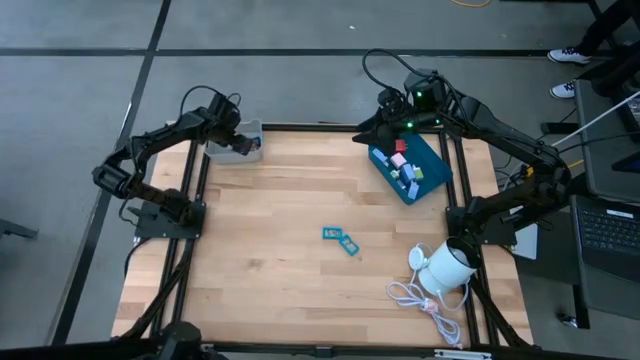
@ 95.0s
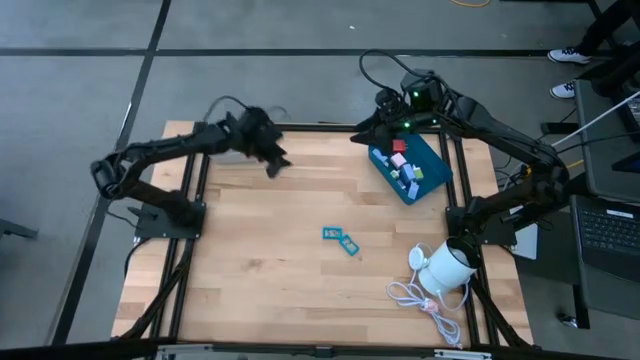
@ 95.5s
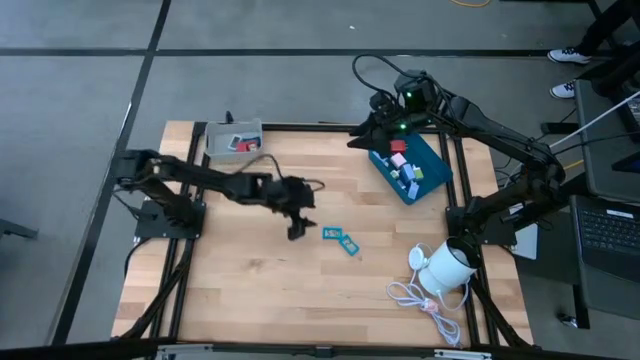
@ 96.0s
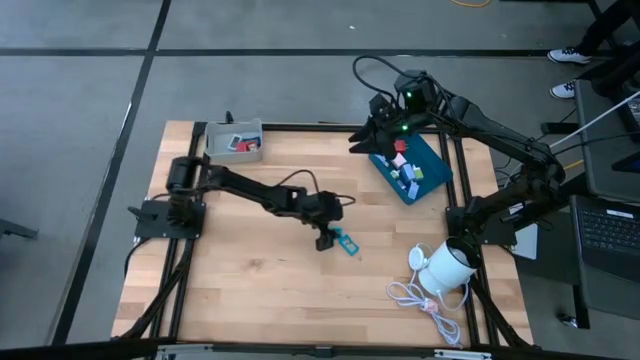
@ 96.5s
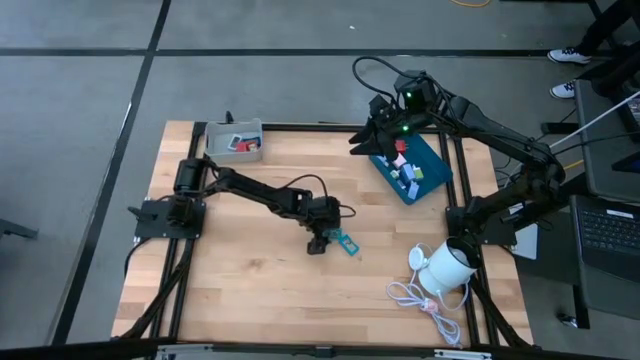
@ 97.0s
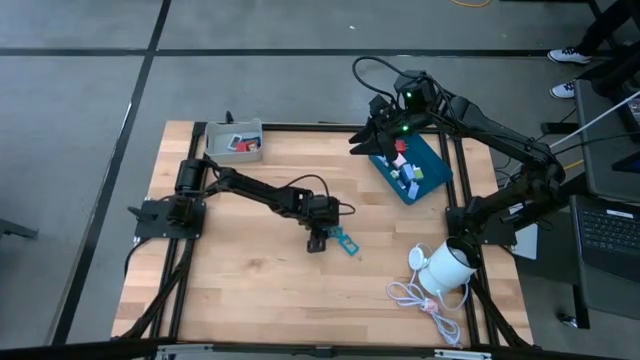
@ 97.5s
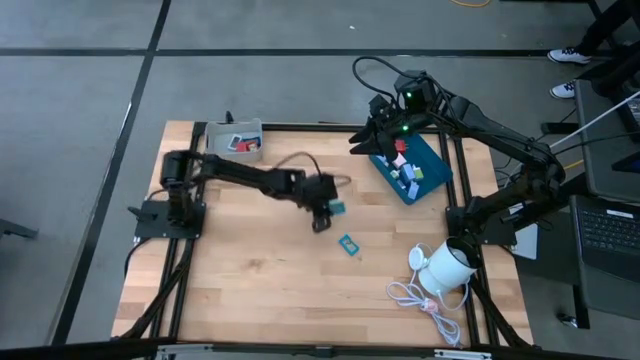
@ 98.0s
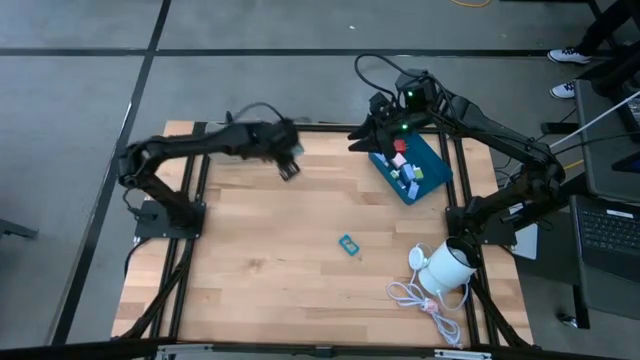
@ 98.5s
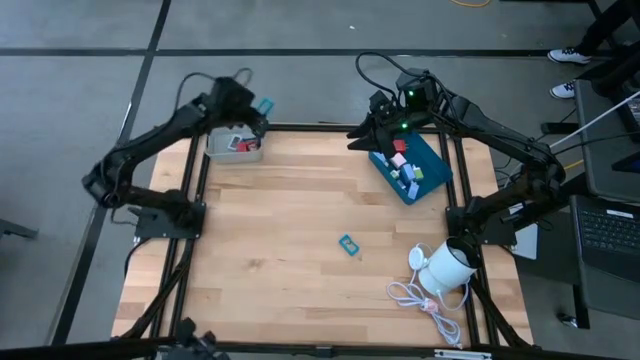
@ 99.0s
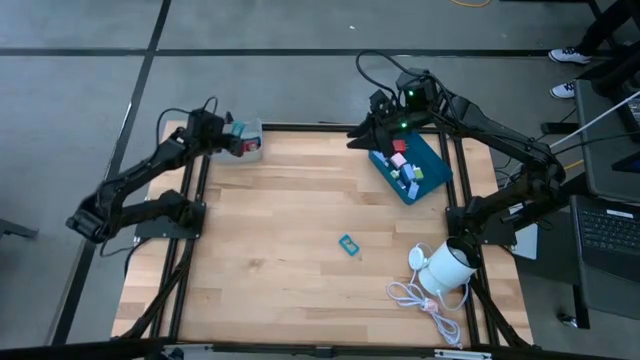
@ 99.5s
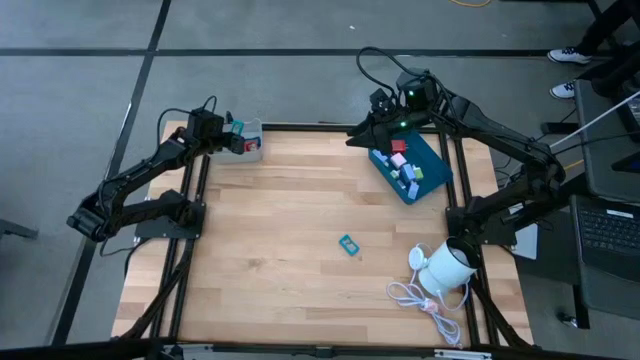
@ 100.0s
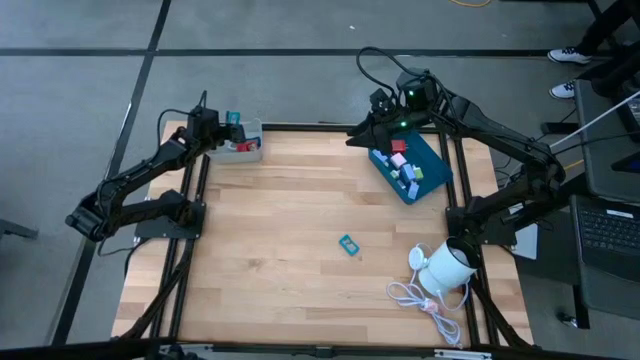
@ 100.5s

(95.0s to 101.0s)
Task: Pick & Place Office items
Put the top light blue digital timer into the gray bin

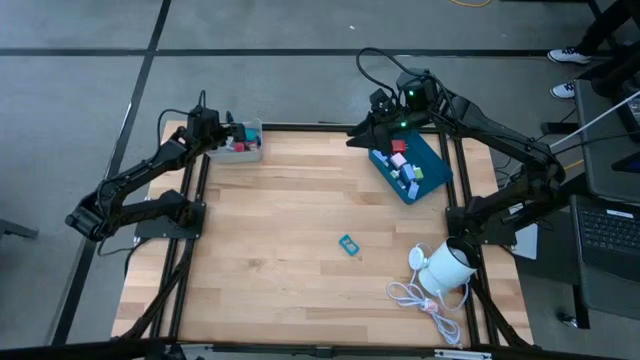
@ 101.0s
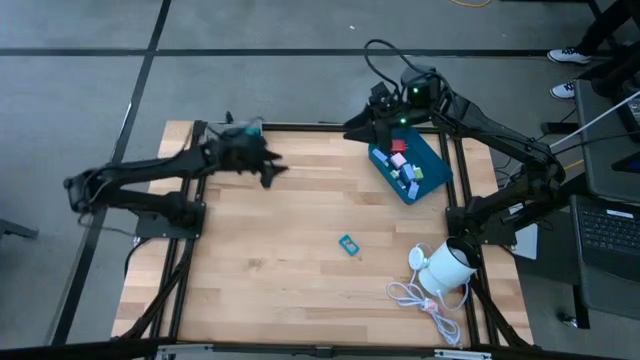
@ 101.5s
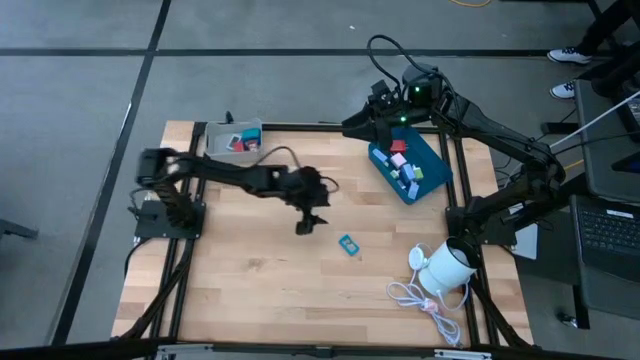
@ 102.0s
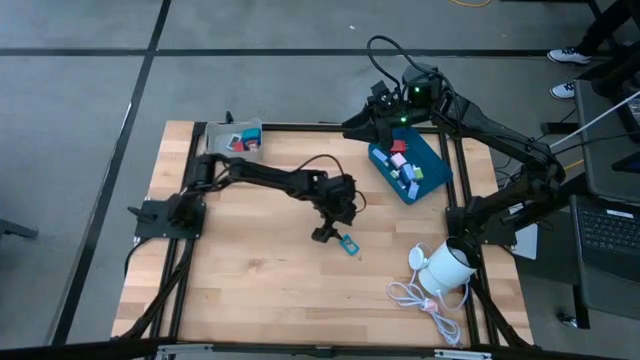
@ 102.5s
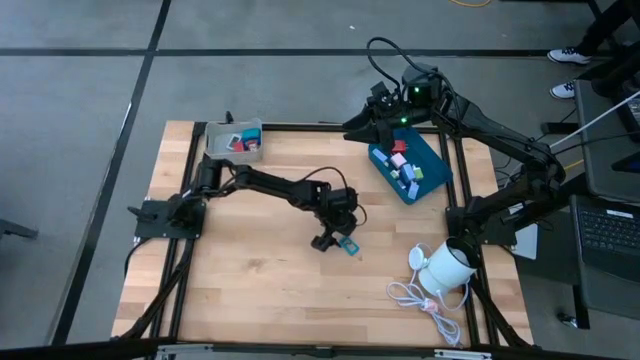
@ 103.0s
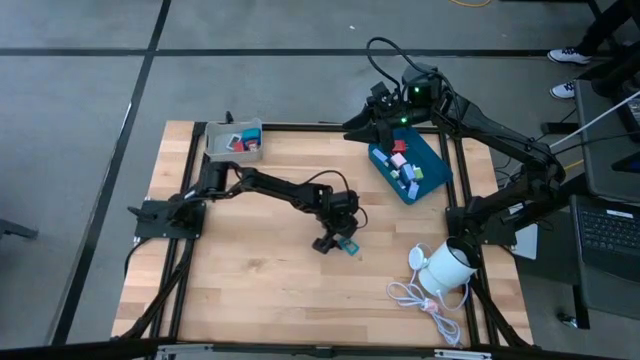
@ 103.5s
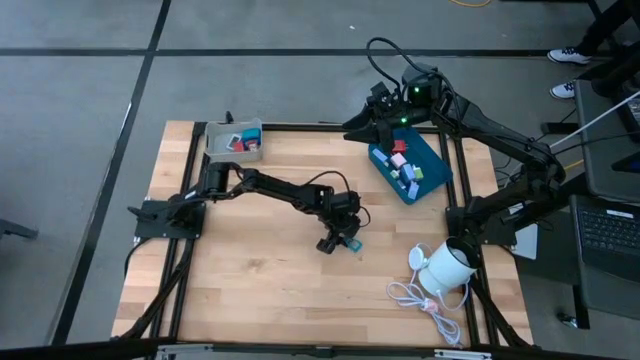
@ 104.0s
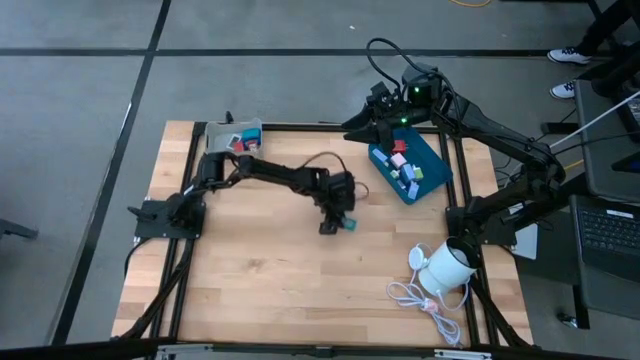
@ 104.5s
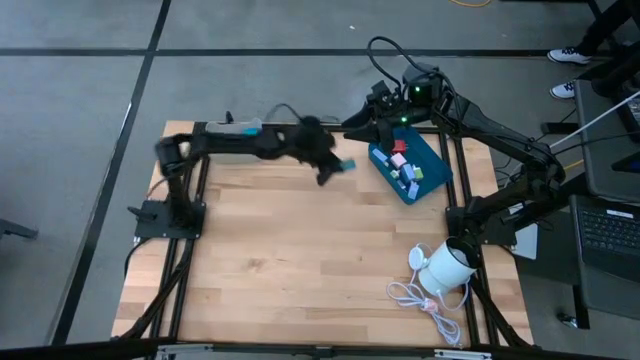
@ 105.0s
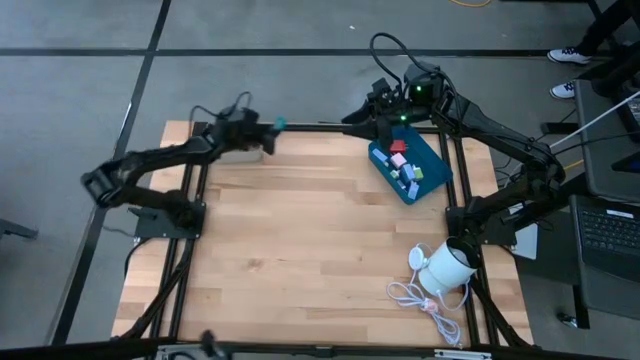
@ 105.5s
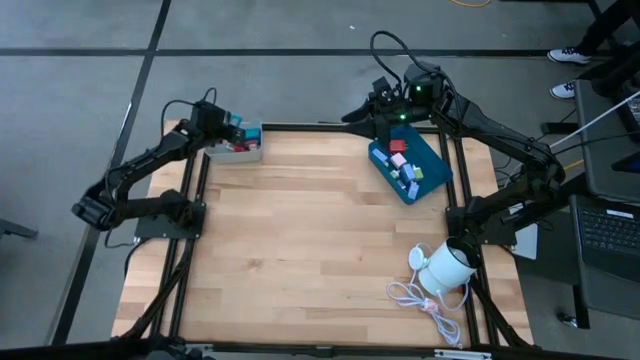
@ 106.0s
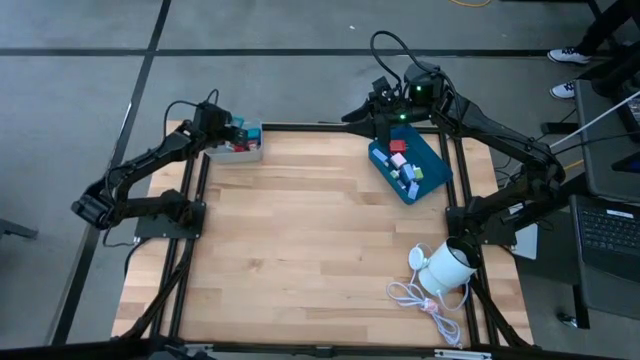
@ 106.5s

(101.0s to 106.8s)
Put the light blue digital timer into the gray bin

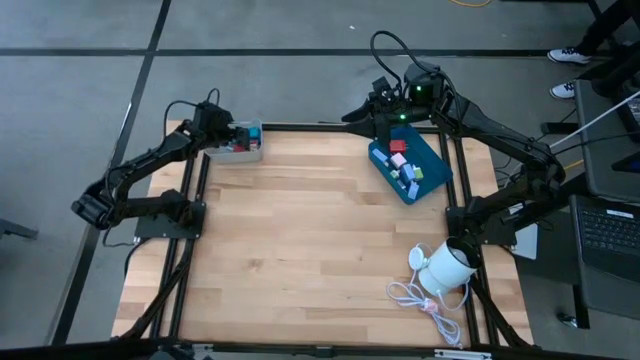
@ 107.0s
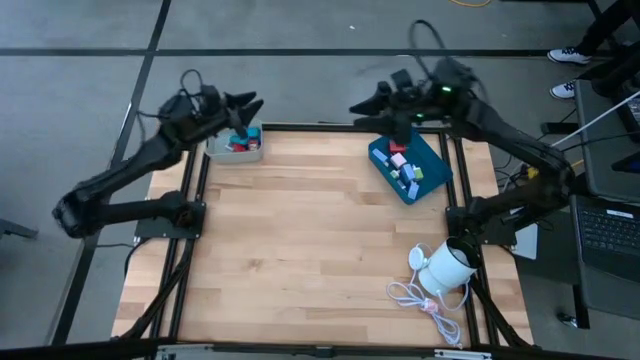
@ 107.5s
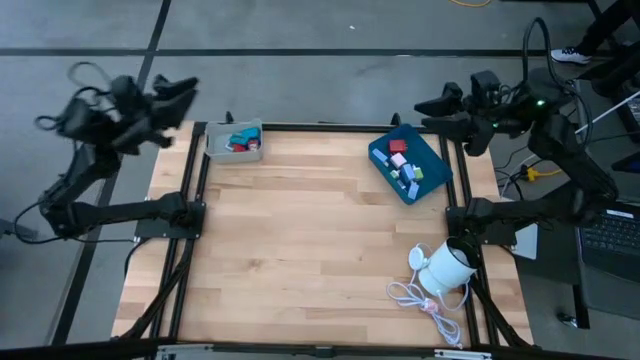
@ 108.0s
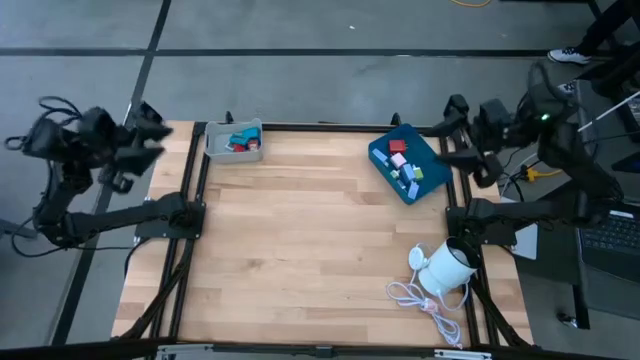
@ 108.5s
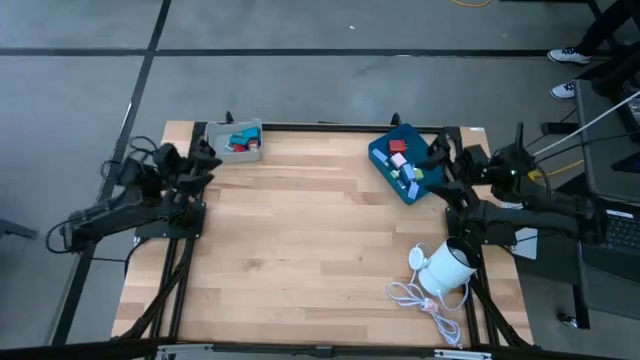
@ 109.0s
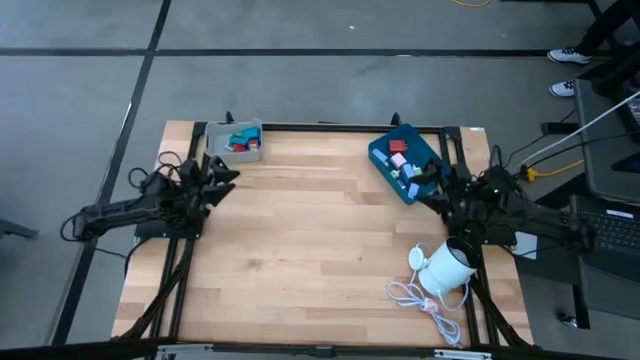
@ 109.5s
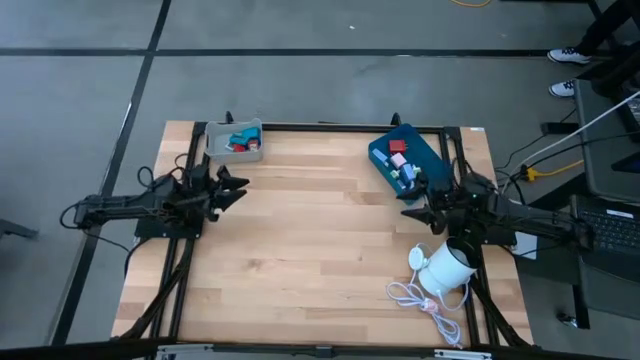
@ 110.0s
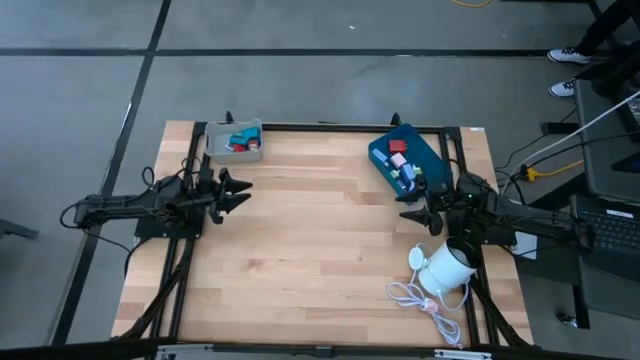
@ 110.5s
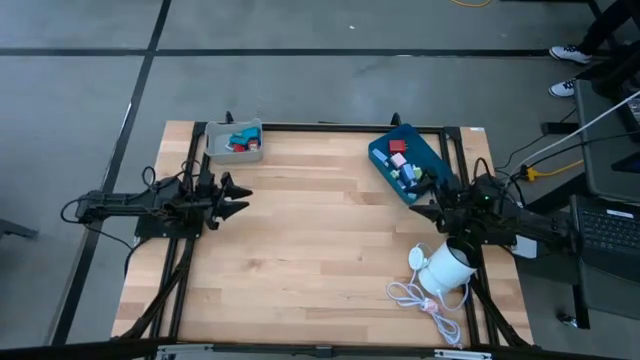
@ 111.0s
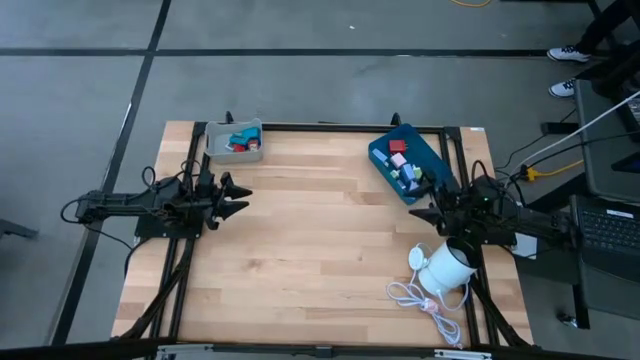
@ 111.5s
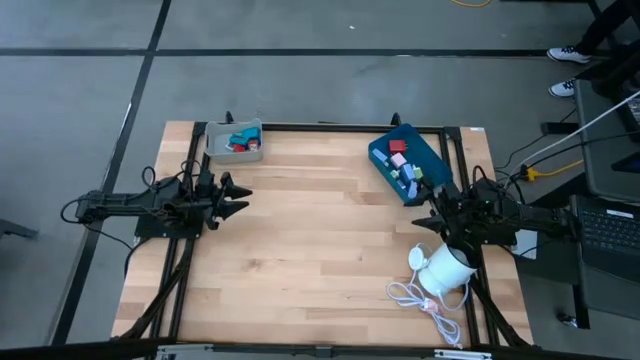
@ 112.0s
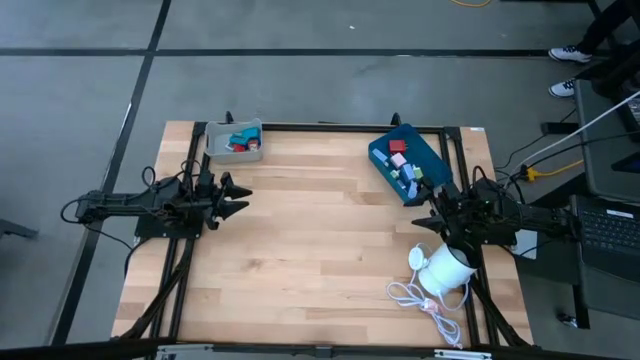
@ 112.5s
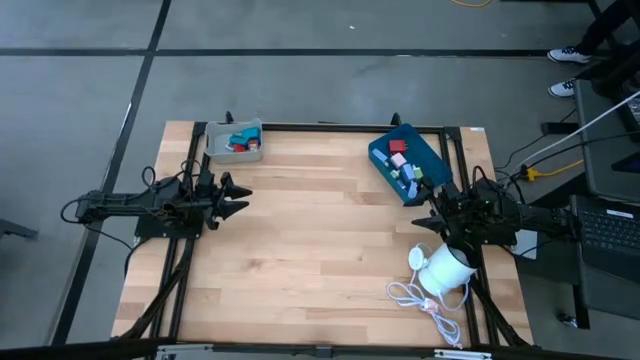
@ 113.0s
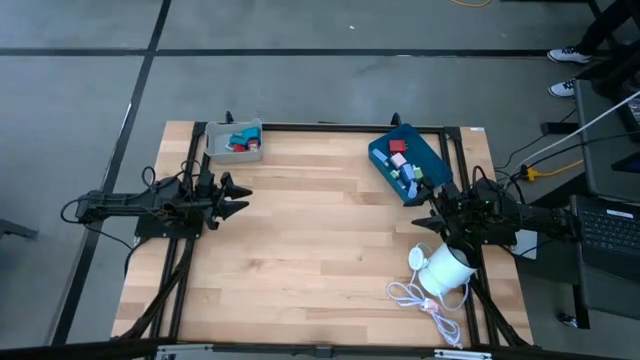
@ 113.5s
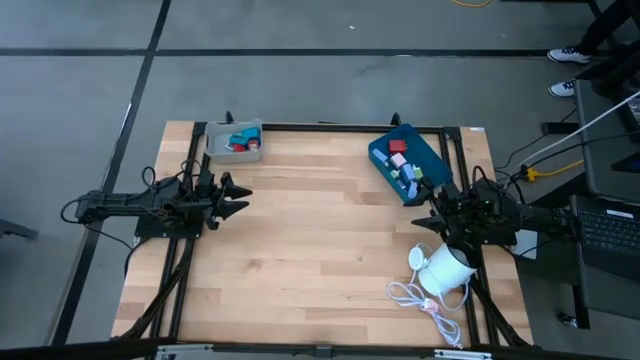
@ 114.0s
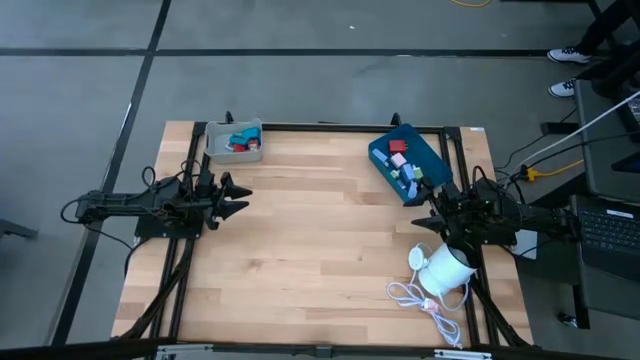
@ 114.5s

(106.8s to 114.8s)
Return to Home Position

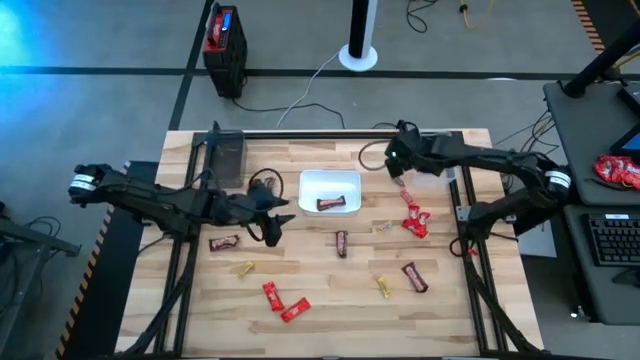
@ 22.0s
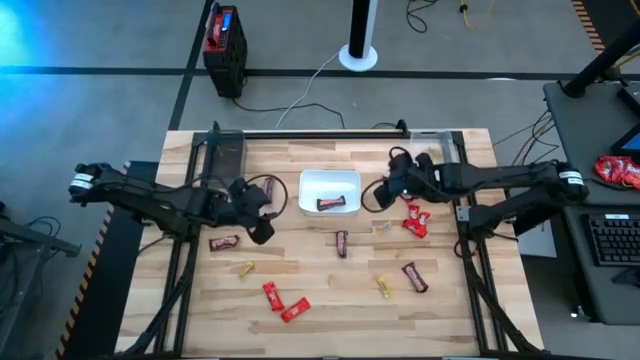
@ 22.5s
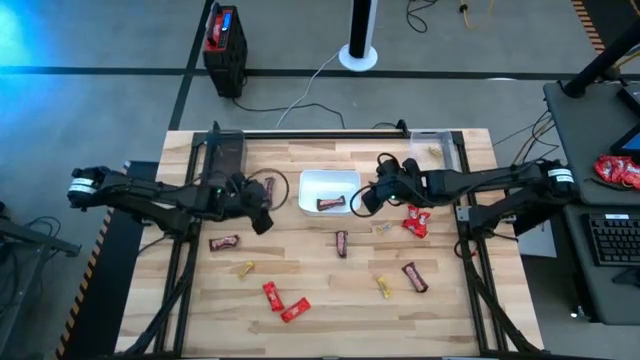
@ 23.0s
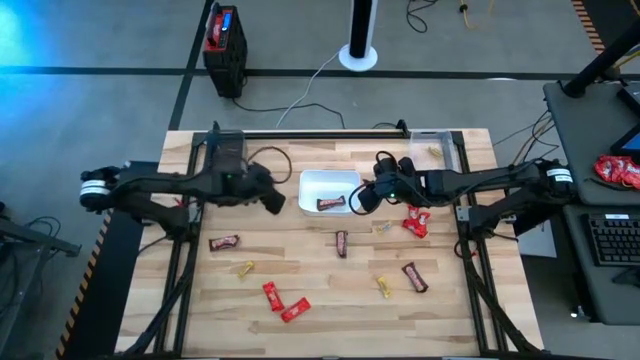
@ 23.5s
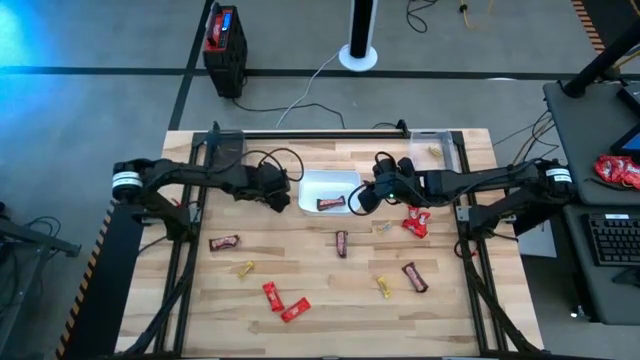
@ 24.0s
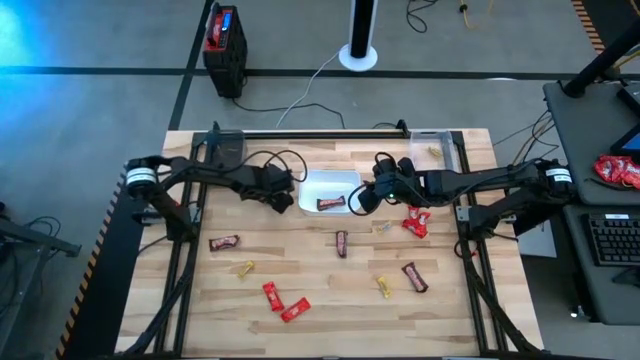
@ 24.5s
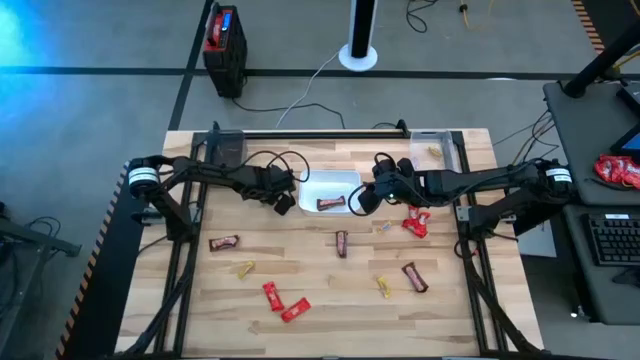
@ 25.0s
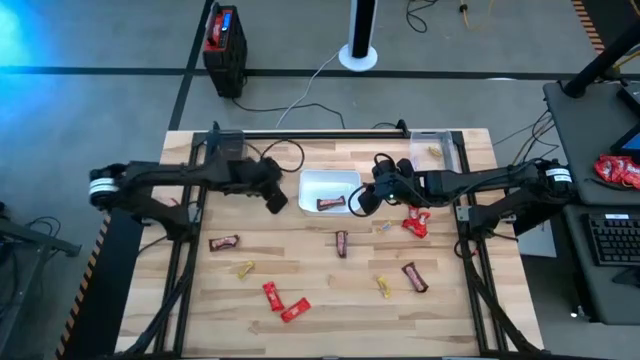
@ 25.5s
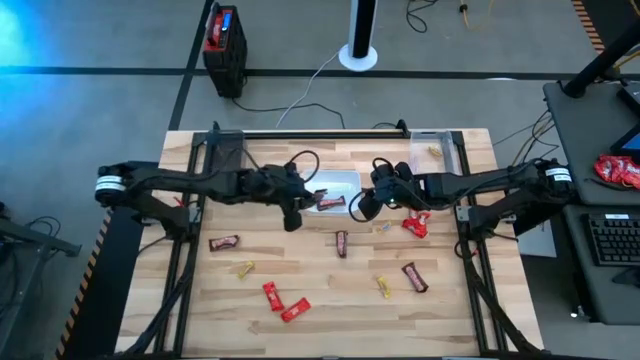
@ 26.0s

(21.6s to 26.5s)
Task: Sort candy by brand, put in halloween buckets
Put the brown chocolate bar into the white bin
